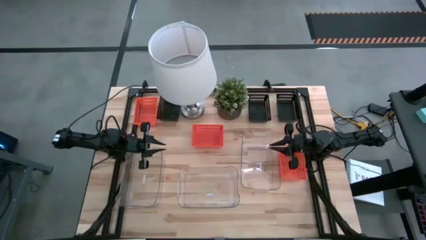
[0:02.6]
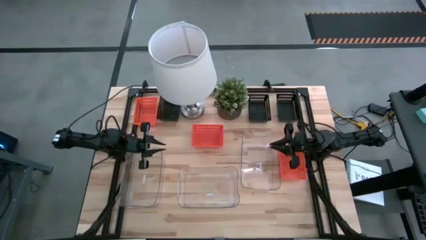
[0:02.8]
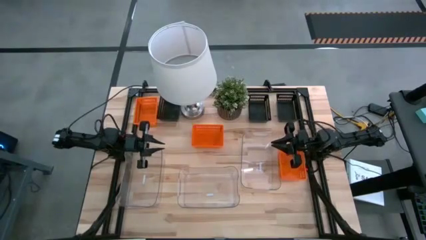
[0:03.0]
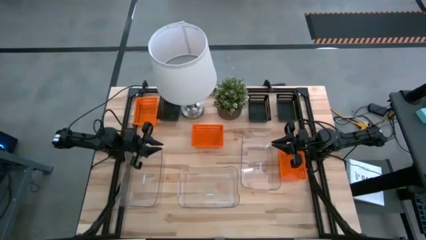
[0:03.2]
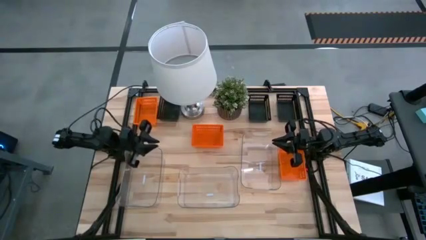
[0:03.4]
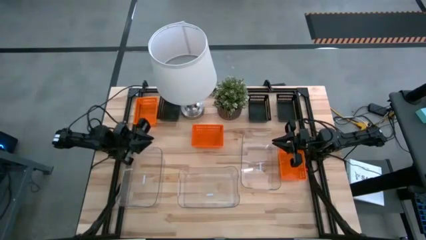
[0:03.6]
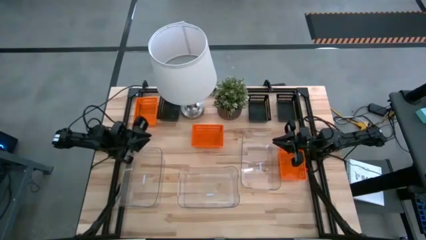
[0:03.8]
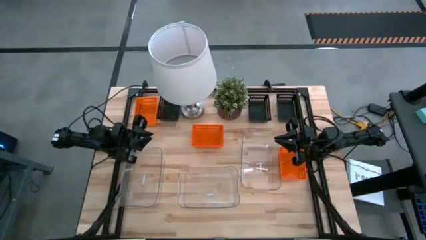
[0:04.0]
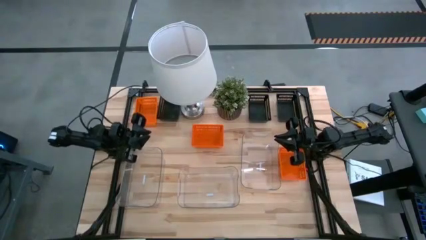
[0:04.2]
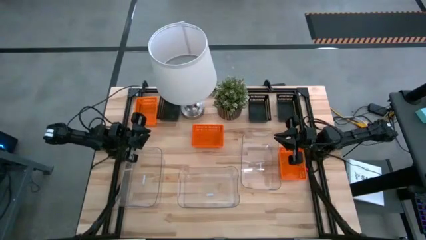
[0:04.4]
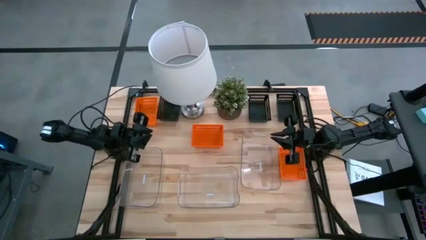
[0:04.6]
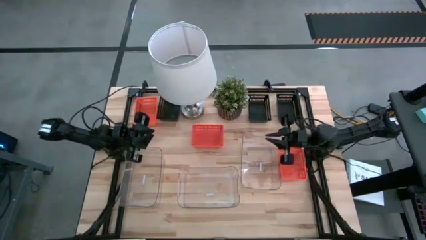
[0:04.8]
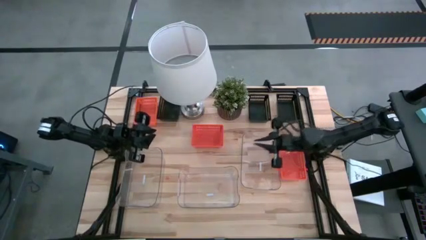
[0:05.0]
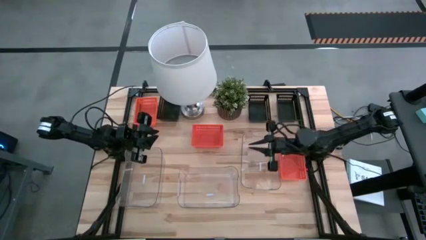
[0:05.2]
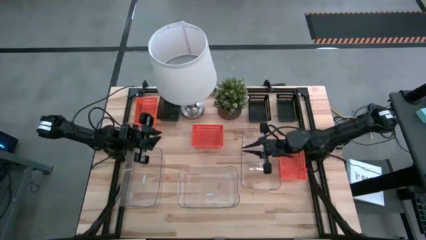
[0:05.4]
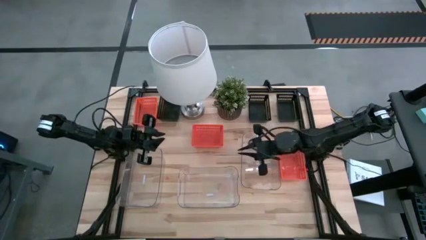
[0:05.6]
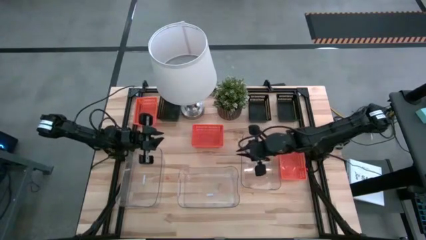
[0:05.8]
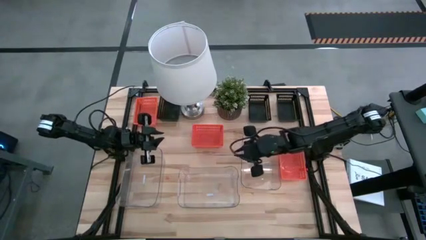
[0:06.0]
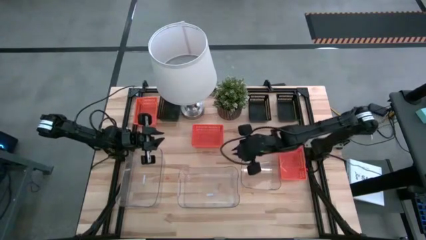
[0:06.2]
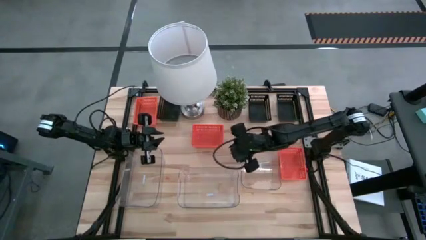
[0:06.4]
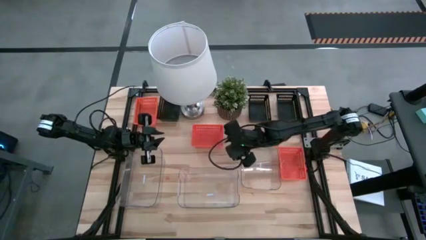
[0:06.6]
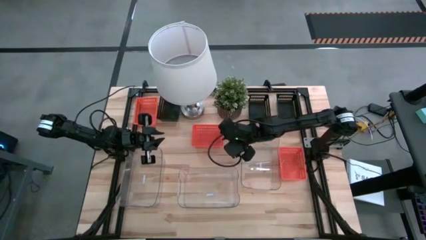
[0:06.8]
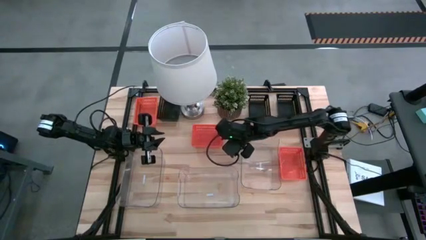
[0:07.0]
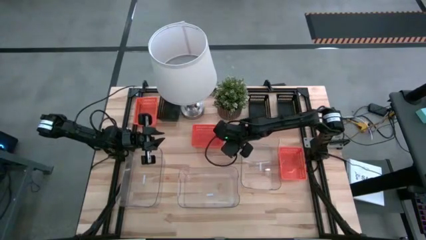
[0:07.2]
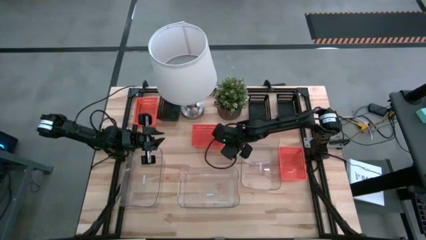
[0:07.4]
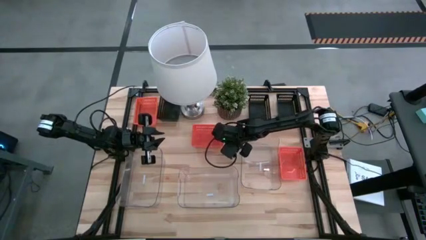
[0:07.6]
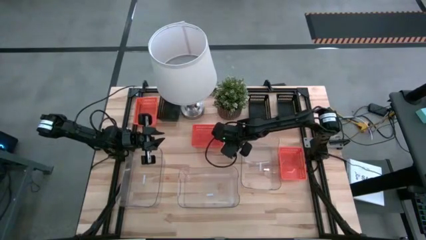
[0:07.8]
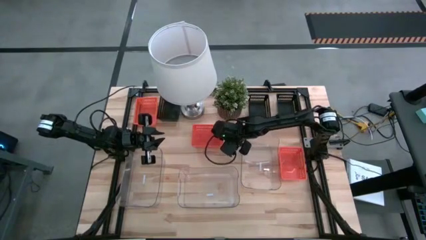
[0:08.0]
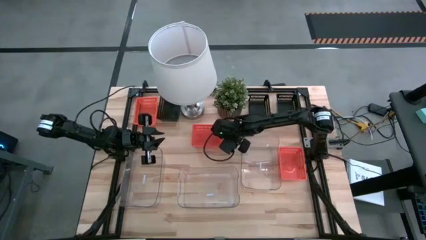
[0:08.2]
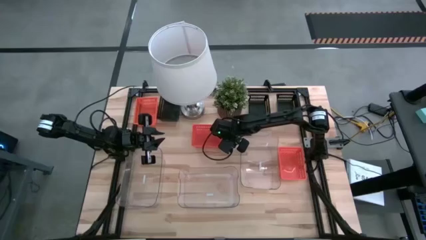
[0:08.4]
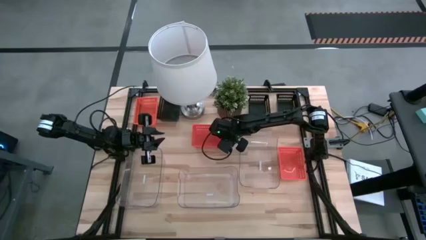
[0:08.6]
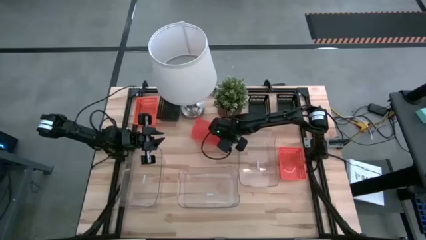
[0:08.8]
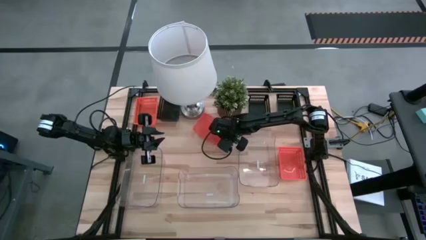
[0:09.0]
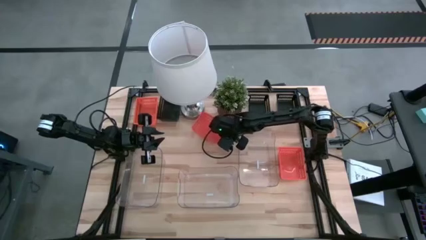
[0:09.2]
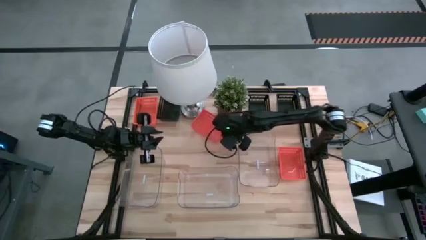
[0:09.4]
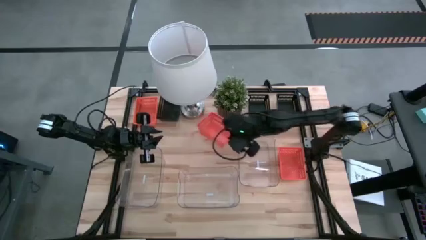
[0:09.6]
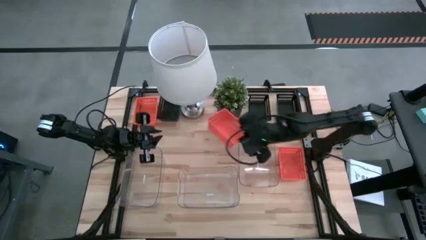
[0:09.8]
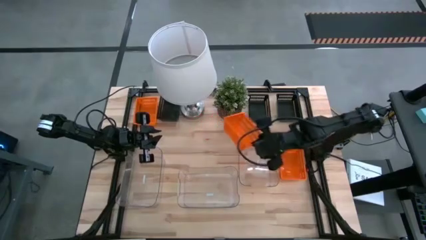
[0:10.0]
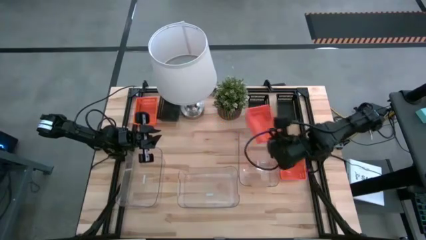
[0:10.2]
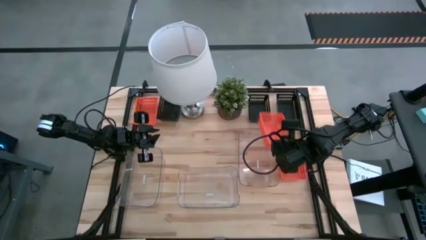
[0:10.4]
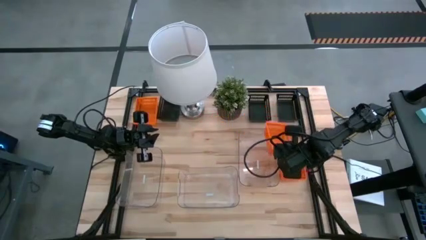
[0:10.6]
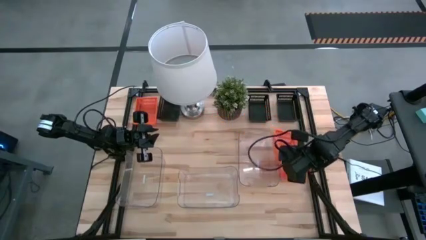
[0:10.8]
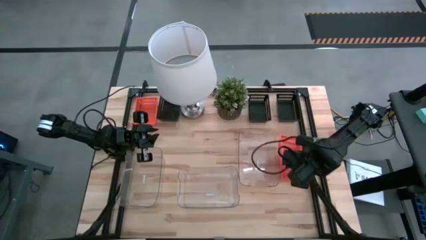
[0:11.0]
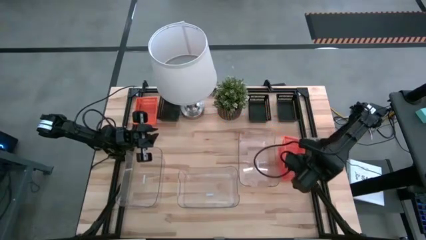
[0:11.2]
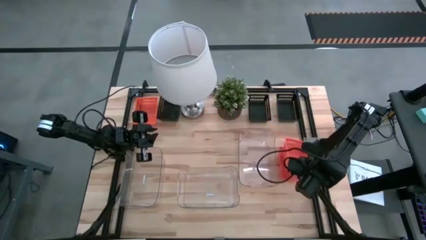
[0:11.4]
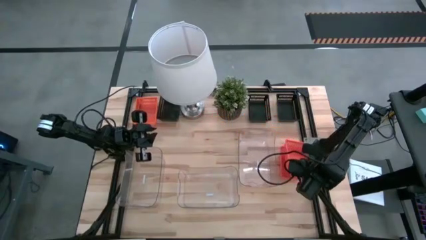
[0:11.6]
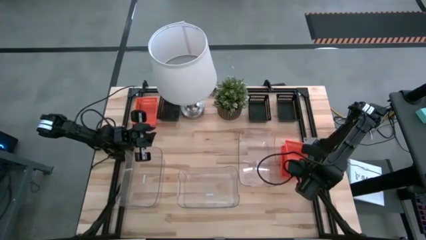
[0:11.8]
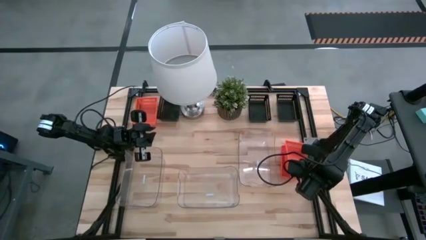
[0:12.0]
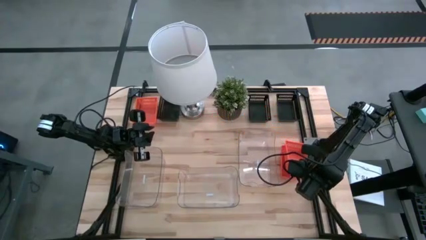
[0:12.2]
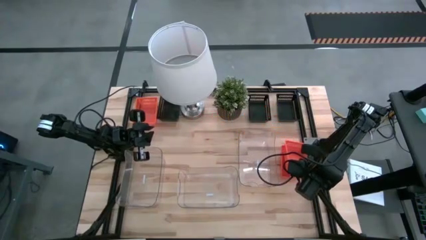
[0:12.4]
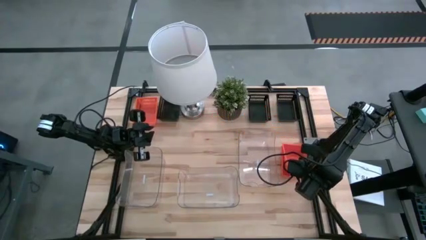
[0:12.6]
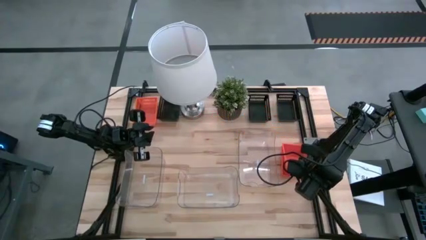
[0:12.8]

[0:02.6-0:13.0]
Stack the center orange bin on the right orange bin
